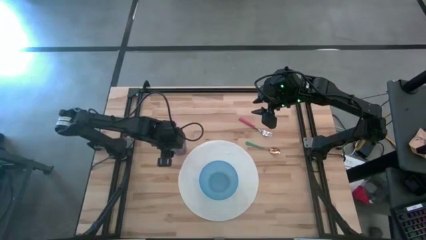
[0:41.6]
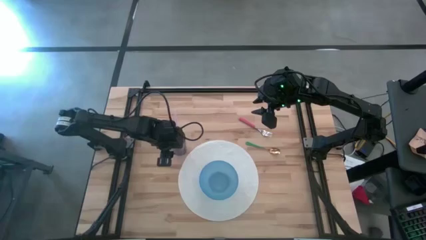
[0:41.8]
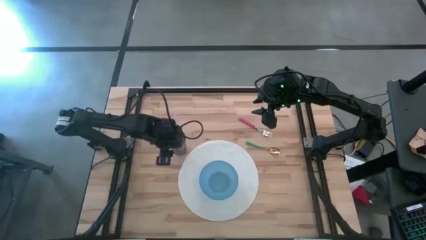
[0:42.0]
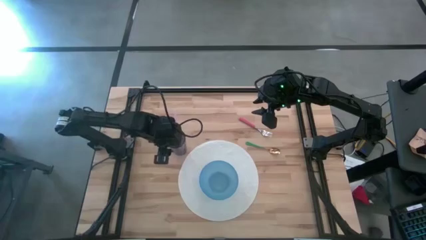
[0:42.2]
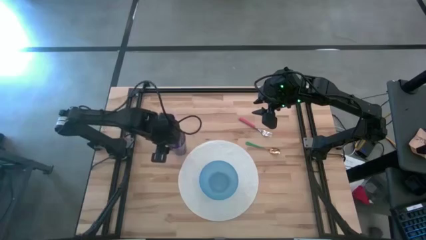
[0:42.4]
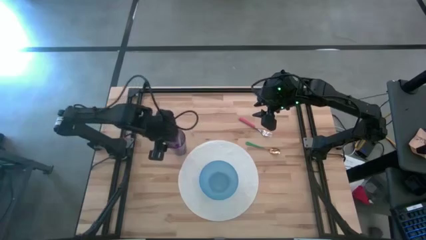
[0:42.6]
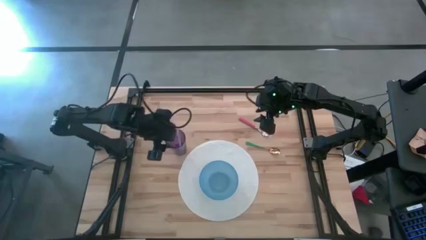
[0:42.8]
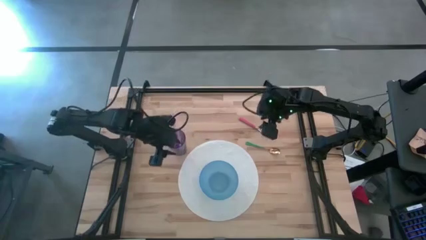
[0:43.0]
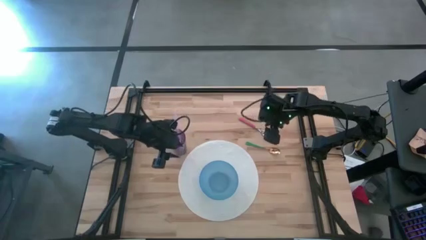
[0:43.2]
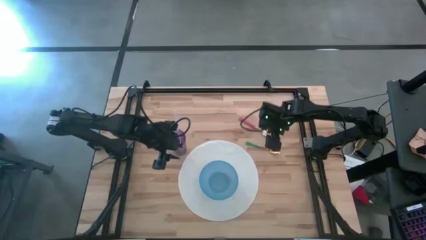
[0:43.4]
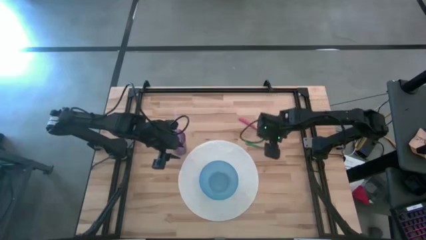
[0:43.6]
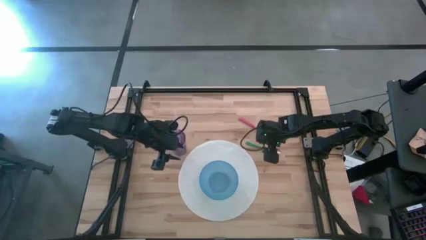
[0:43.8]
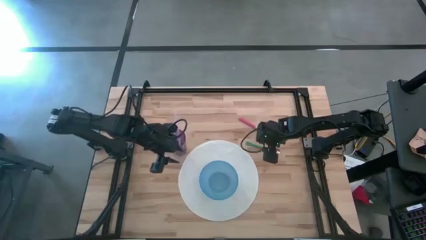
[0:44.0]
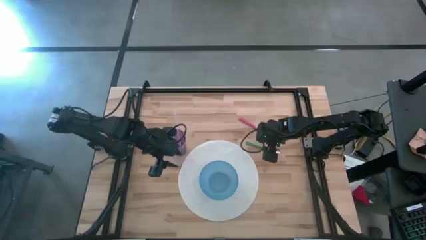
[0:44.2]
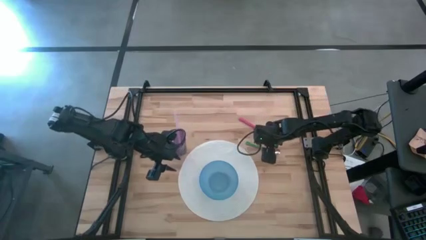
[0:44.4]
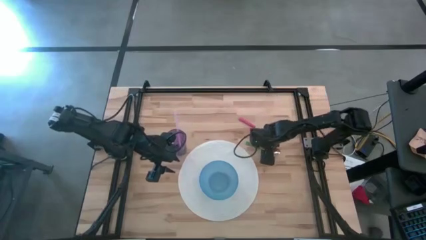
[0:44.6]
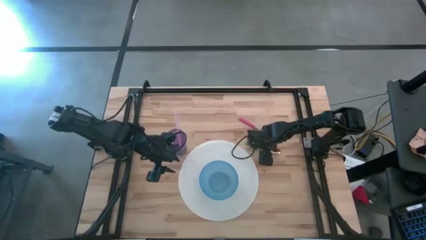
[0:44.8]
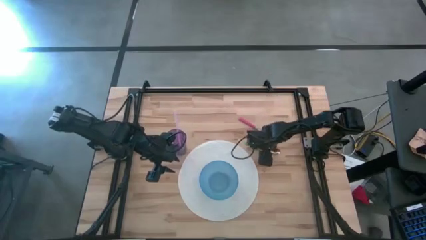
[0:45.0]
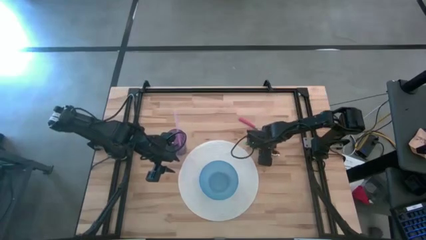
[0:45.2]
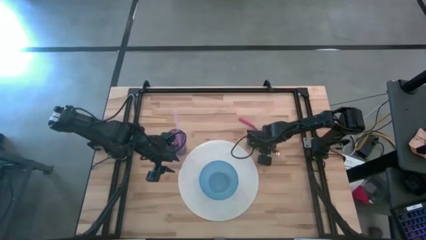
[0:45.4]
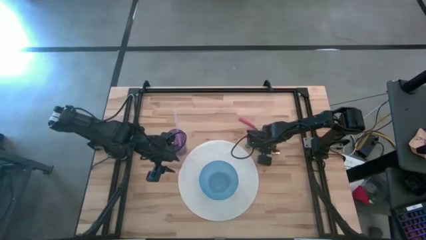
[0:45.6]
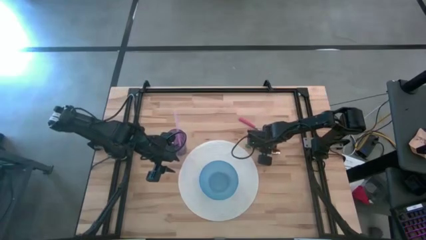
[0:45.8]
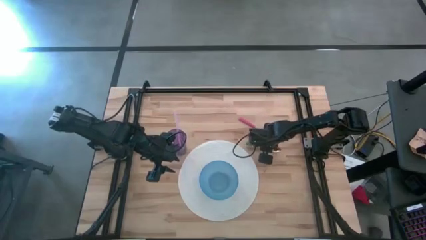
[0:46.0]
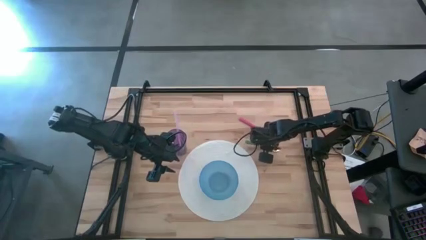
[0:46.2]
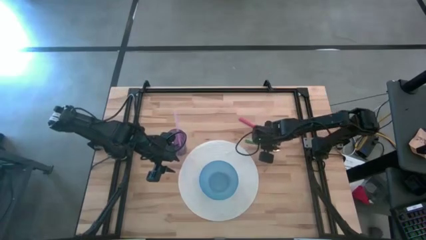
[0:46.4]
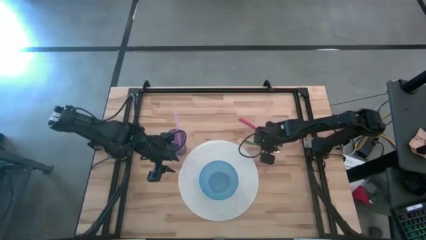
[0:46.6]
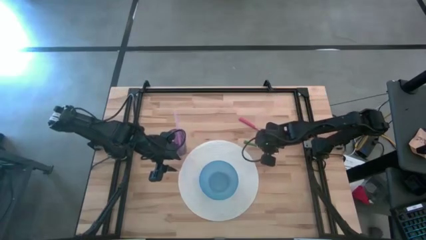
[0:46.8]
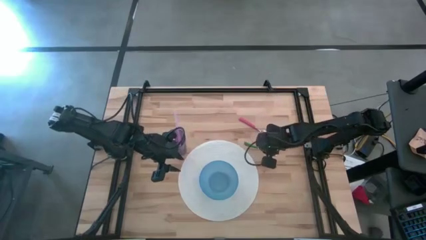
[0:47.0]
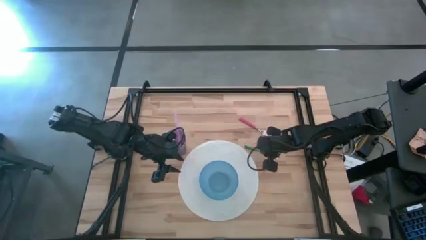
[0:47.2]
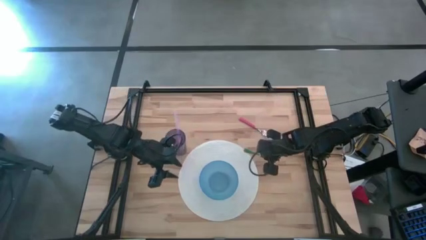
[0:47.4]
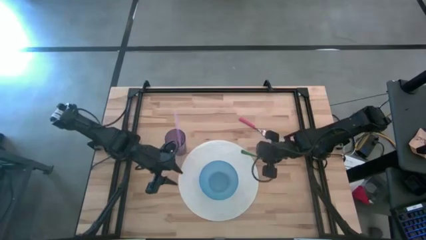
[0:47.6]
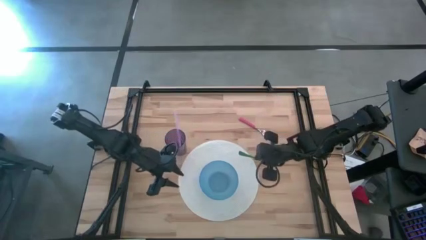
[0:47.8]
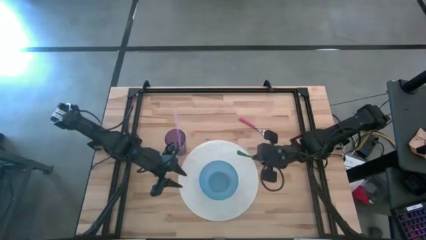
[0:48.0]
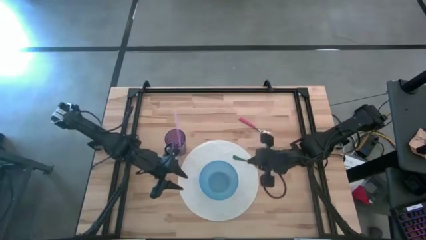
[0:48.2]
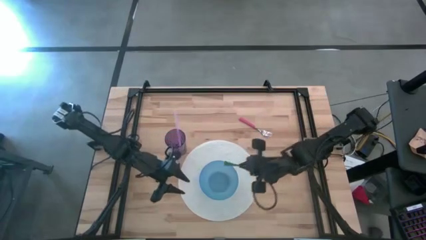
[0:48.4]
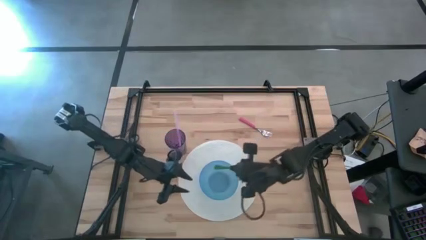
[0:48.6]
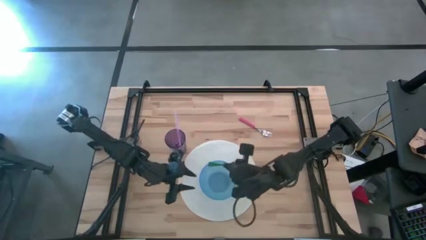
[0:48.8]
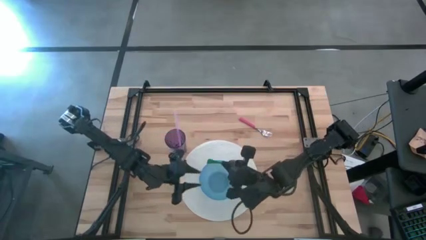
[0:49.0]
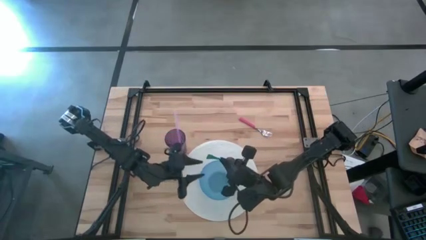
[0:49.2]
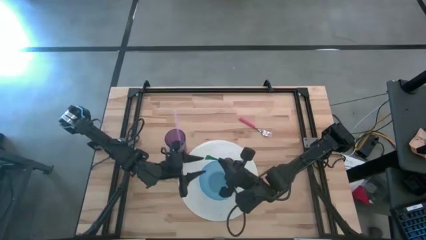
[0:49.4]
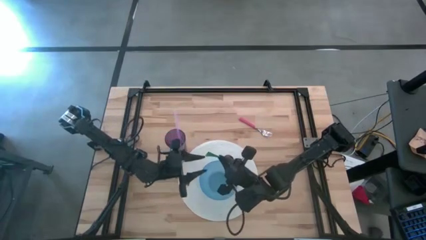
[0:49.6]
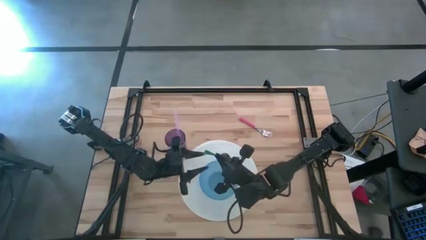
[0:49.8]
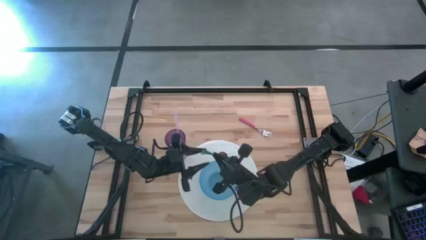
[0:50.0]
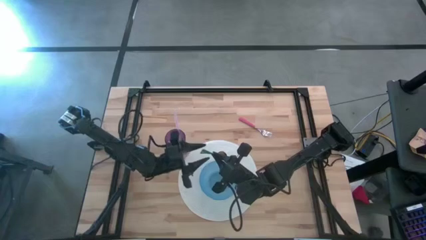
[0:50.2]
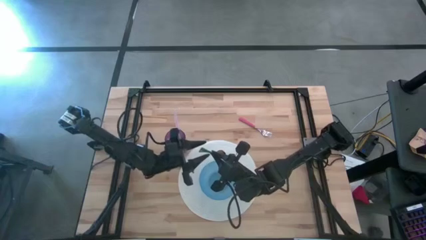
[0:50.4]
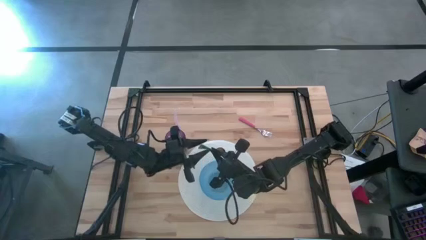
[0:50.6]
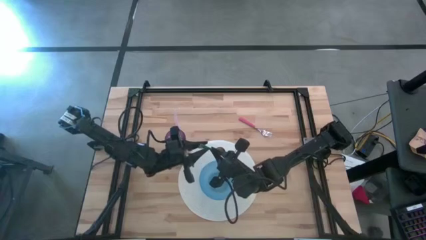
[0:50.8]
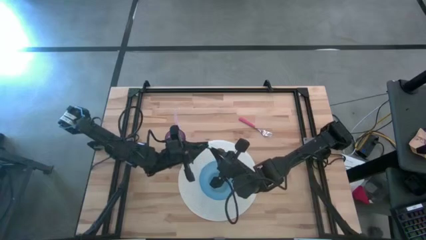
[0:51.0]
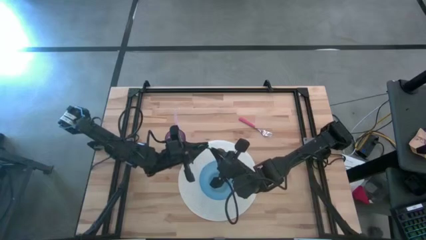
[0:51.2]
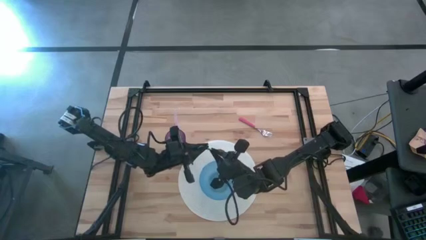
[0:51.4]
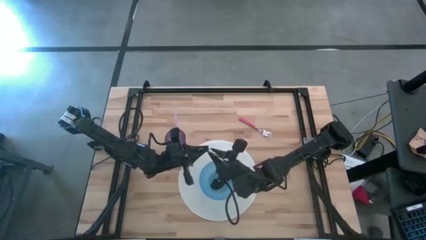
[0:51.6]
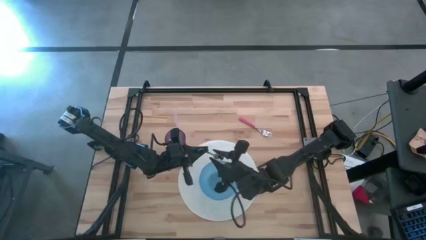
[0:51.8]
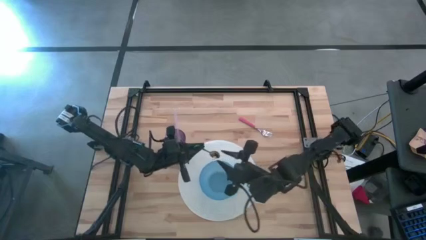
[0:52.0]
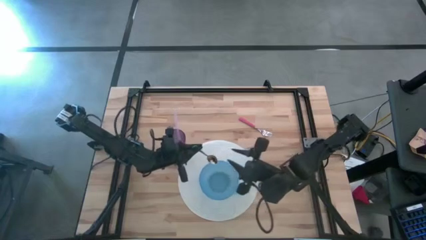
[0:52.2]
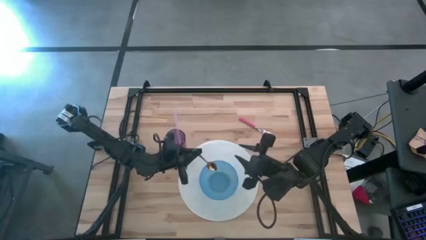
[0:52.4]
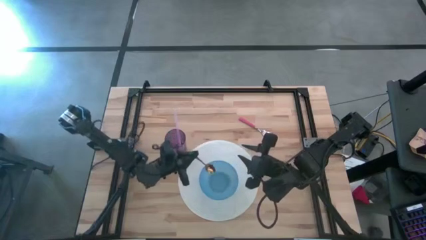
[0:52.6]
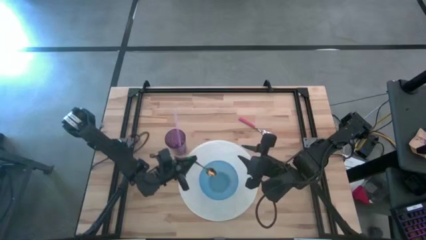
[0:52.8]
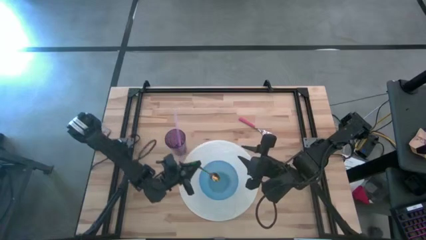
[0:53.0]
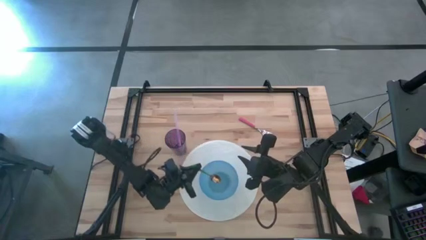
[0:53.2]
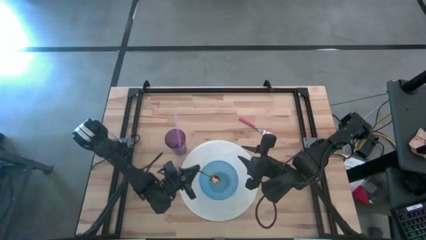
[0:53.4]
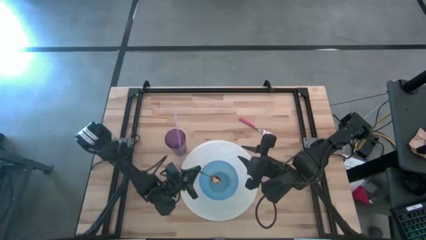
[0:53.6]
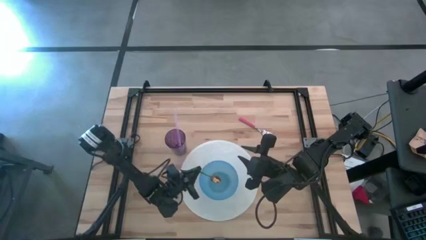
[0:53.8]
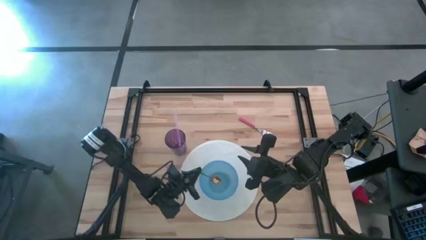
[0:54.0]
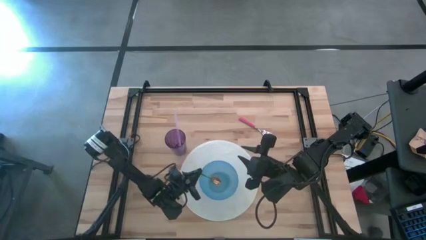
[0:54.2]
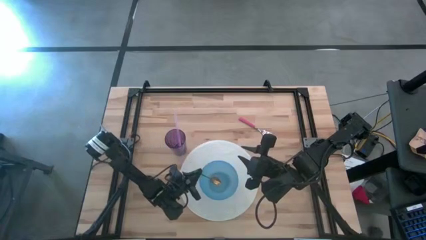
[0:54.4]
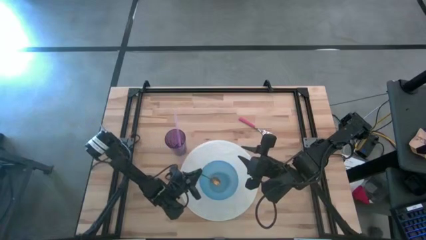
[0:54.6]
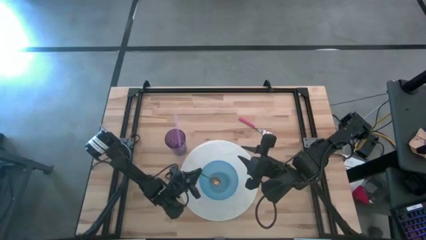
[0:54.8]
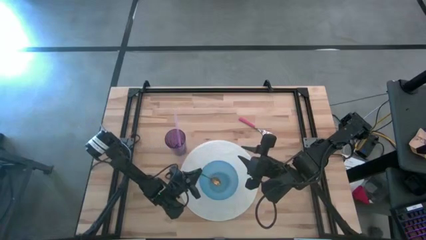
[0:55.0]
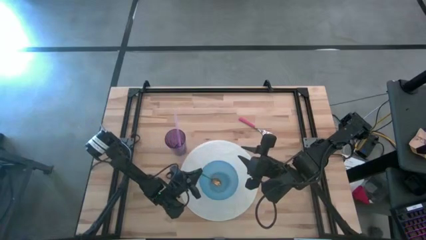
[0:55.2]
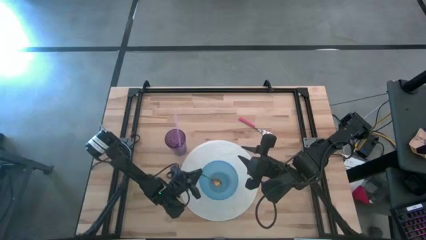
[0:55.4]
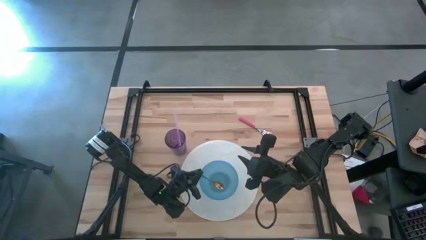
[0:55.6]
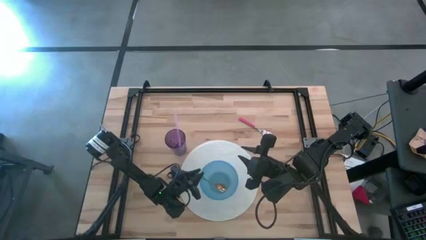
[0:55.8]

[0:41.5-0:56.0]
Task: Pick & Place Utensil
Put the spoon into the bowl
